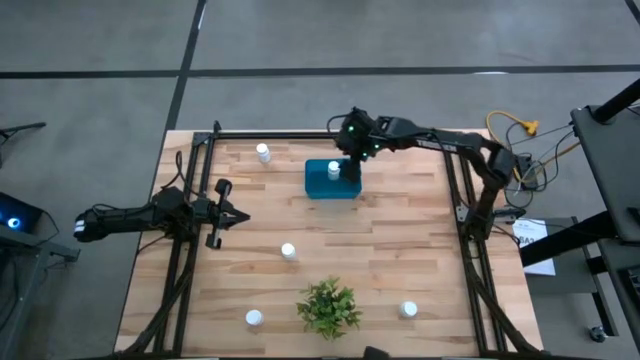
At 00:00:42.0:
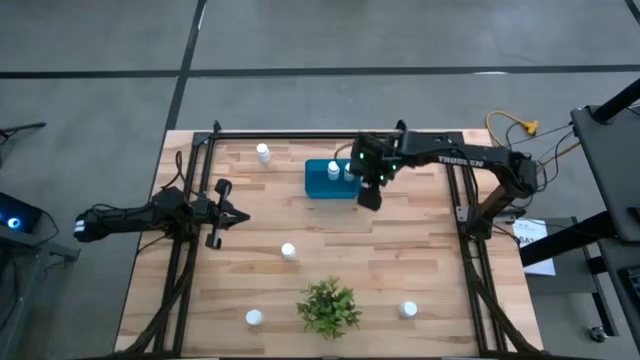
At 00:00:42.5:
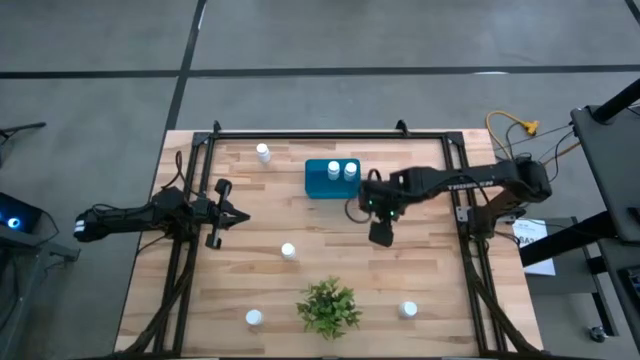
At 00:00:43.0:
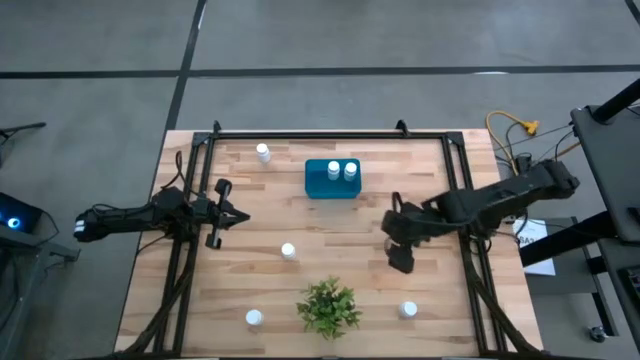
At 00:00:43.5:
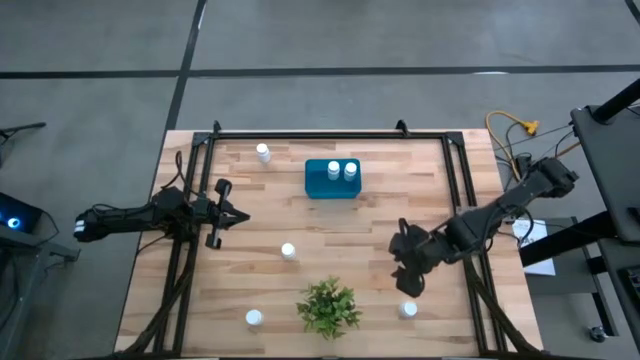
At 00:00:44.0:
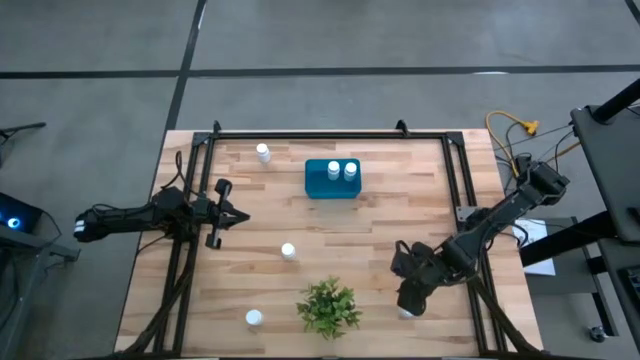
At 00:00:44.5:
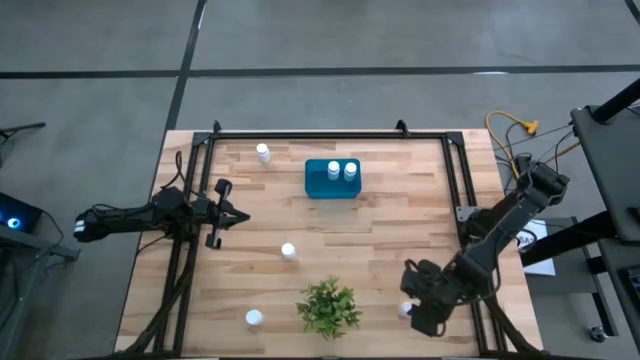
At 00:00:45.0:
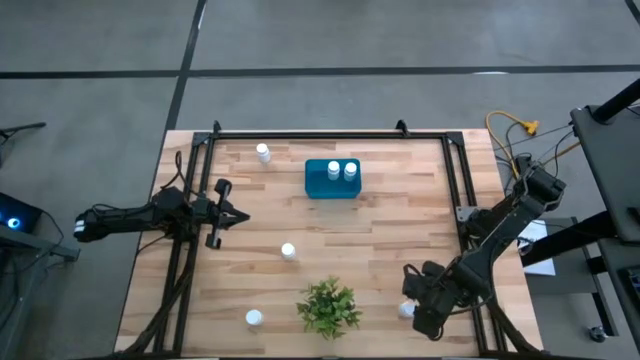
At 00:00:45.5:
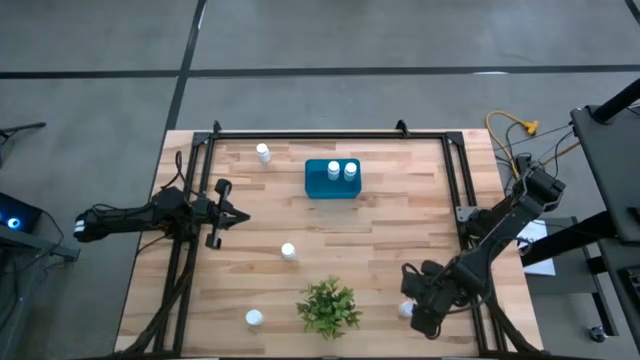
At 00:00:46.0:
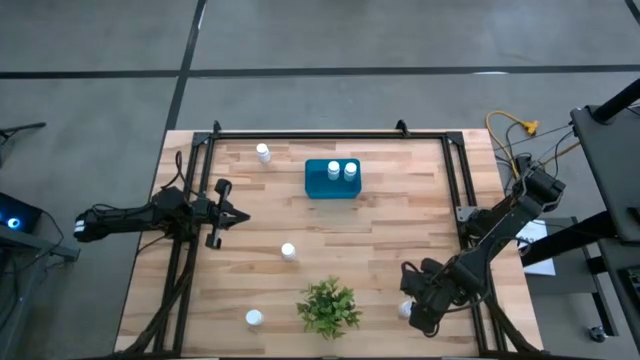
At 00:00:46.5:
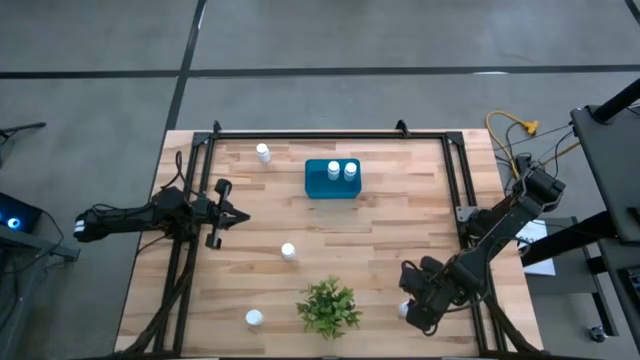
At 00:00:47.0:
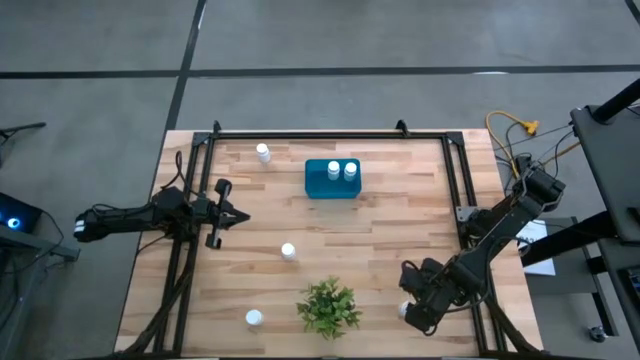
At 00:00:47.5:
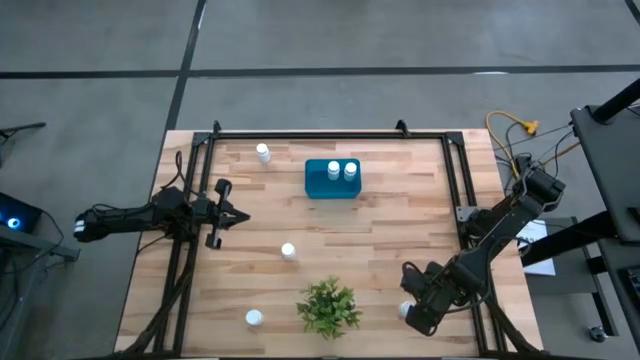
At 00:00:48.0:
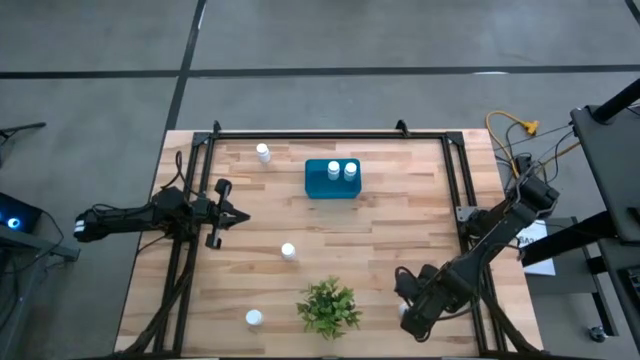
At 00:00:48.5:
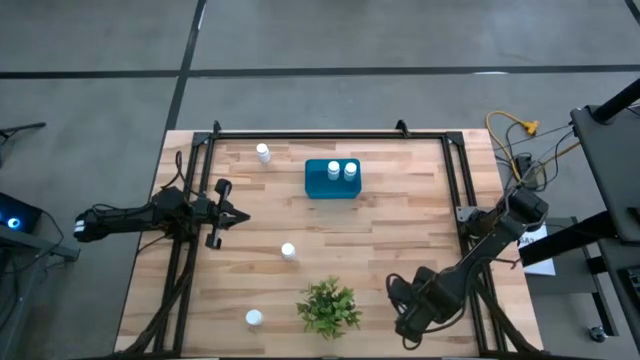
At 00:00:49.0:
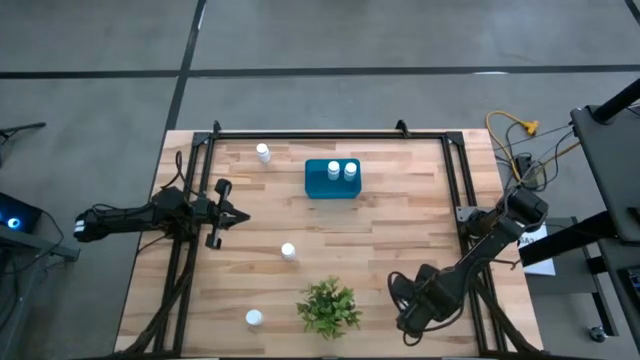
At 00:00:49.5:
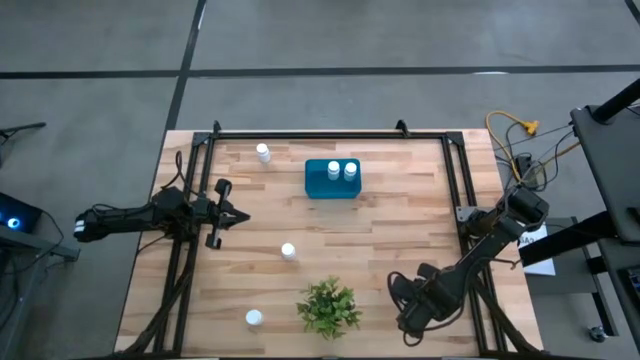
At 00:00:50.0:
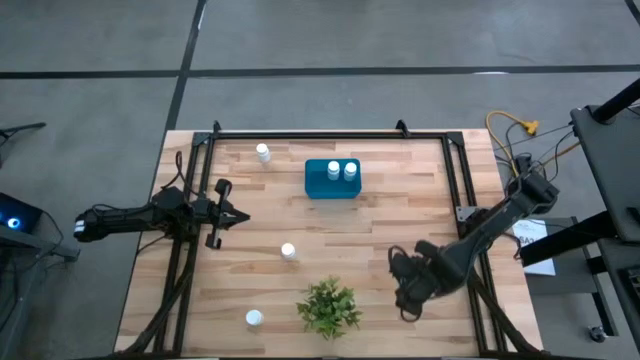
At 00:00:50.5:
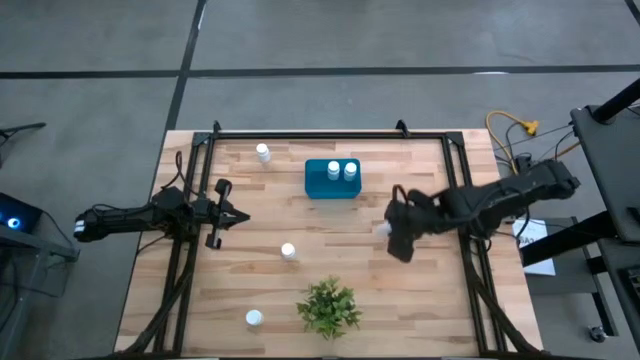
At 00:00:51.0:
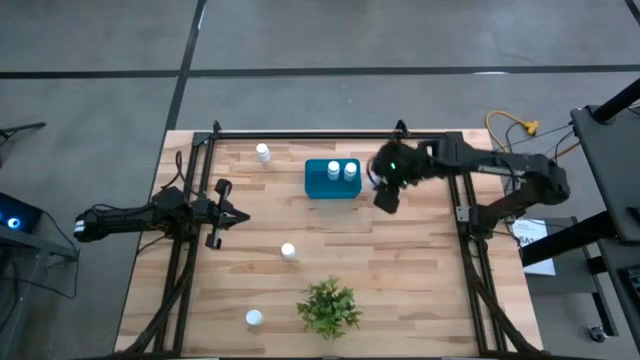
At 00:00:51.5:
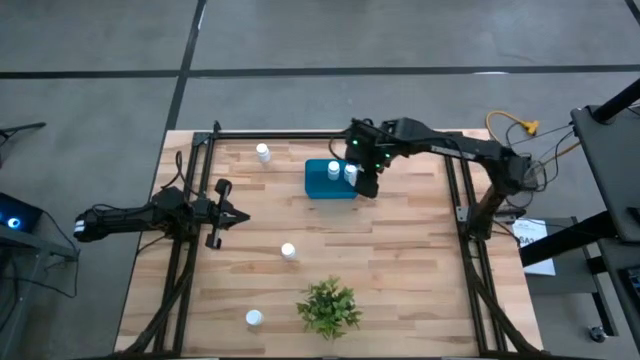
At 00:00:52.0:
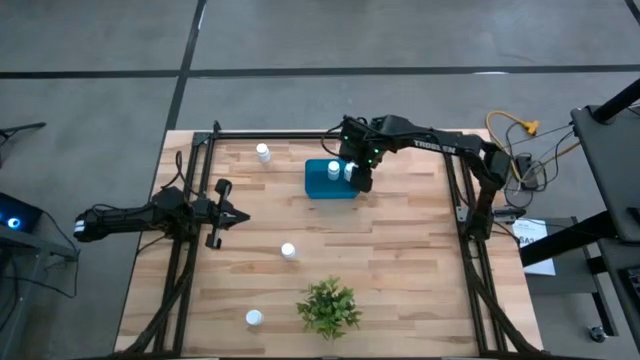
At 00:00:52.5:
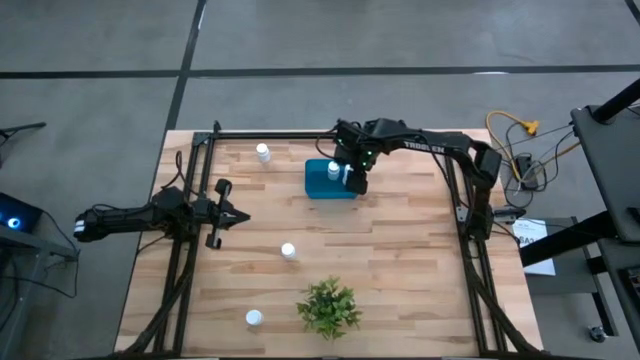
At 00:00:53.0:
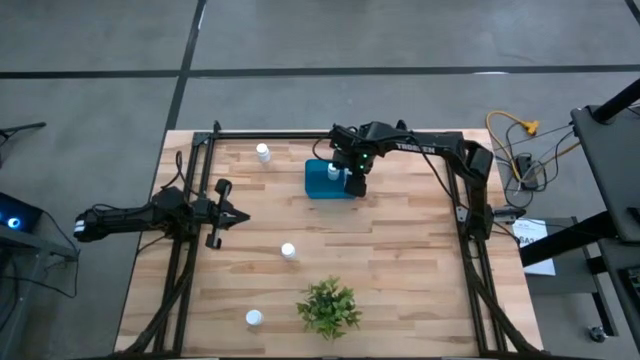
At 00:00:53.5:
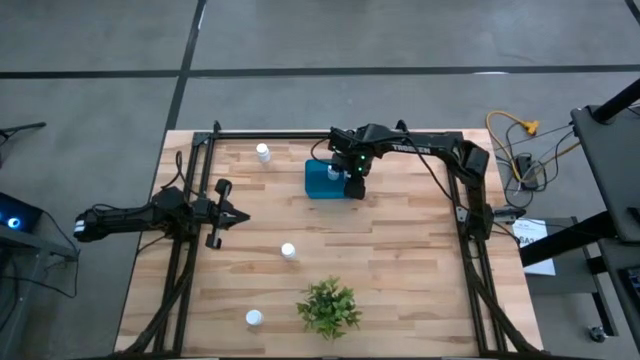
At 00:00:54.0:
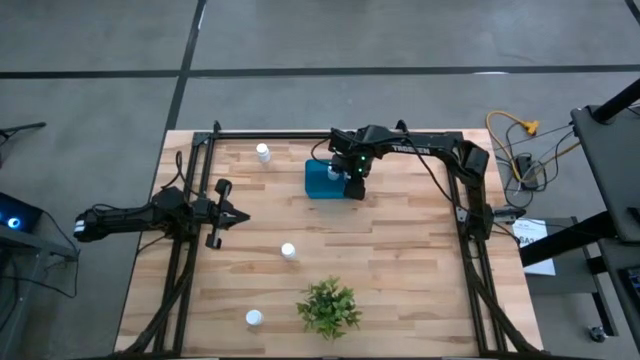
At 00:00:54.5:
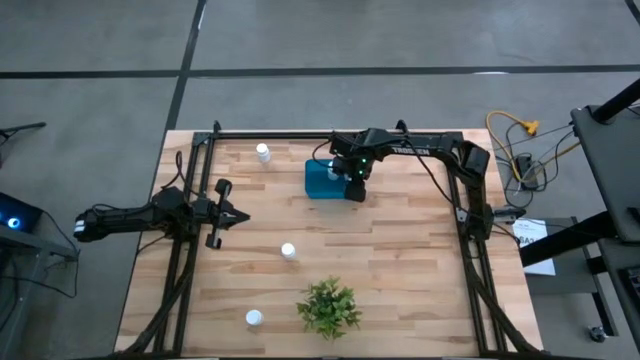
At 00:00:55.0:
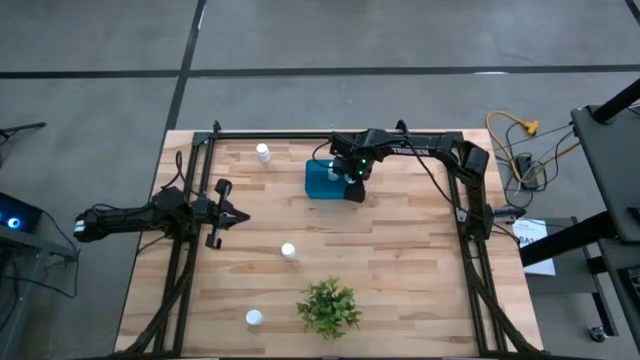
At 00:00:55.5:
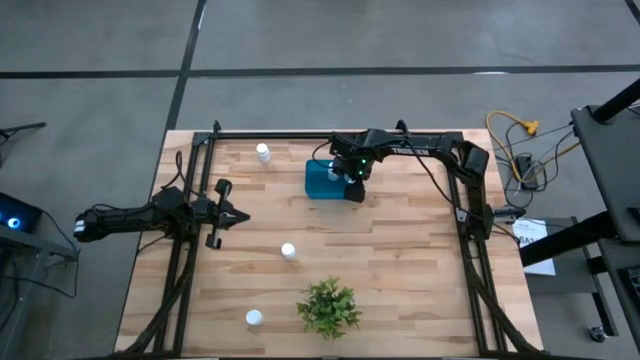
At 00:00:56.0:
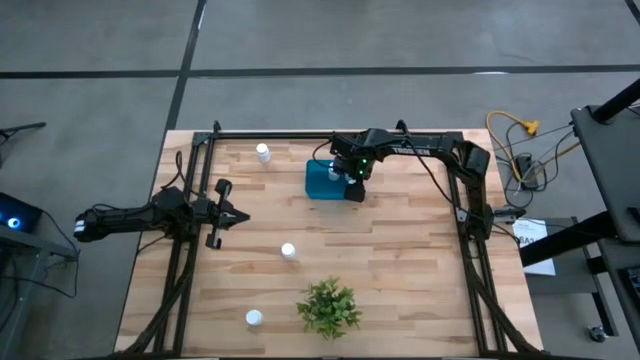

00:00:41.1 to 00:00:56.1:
Task: Pick and place pill bottles into a basket
Put the white pill bottle into the blue bin
